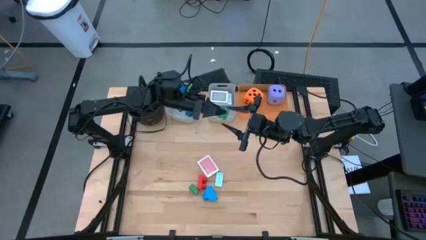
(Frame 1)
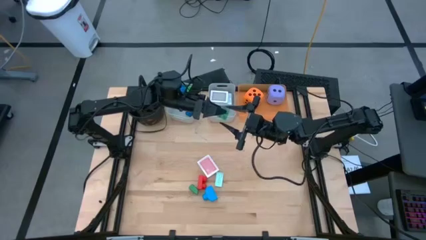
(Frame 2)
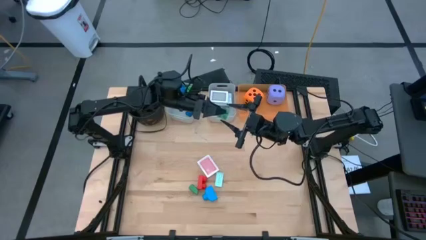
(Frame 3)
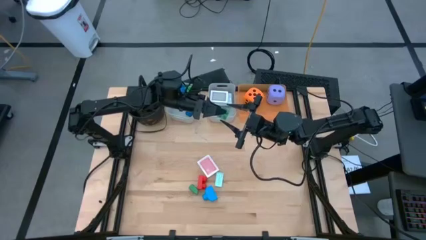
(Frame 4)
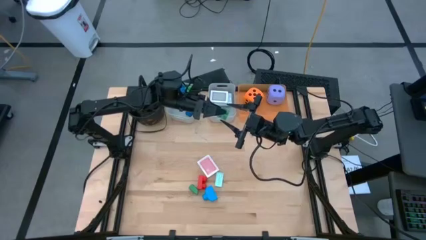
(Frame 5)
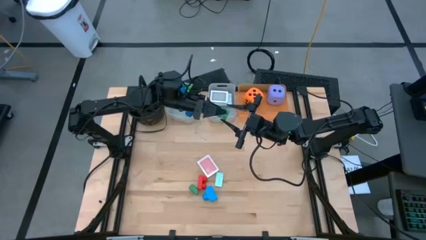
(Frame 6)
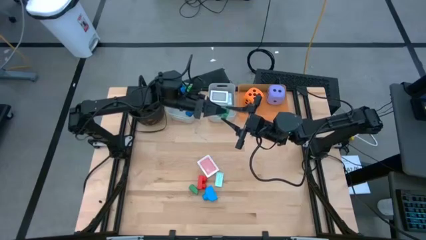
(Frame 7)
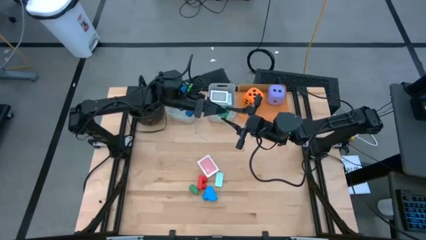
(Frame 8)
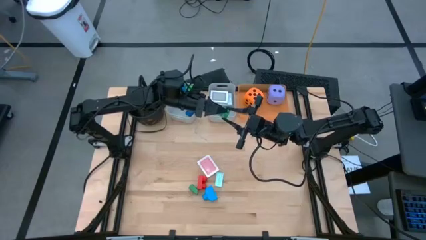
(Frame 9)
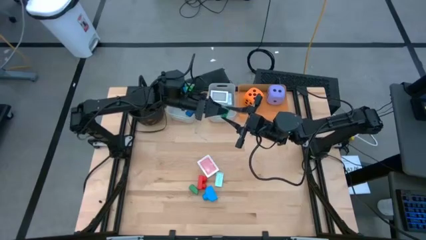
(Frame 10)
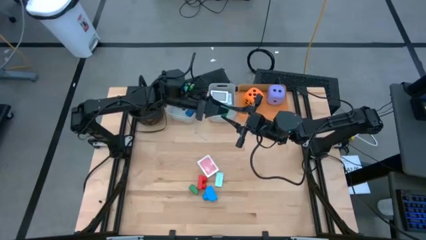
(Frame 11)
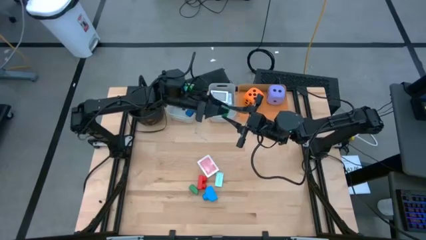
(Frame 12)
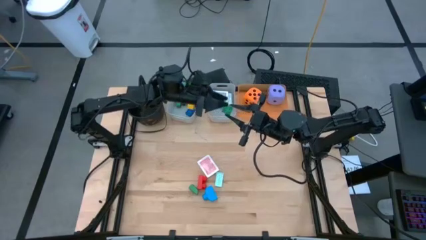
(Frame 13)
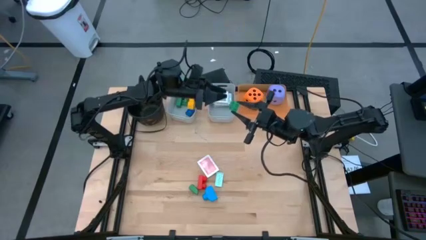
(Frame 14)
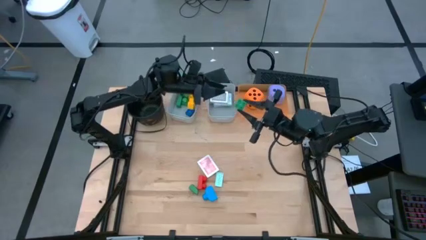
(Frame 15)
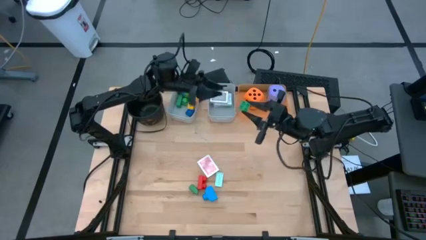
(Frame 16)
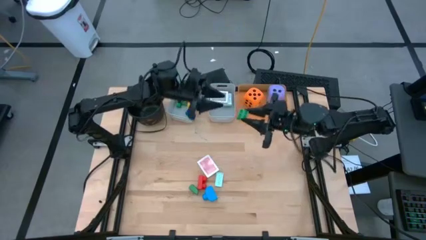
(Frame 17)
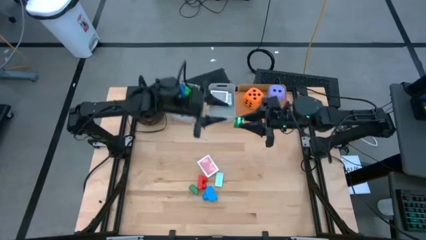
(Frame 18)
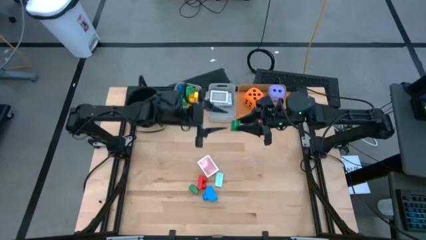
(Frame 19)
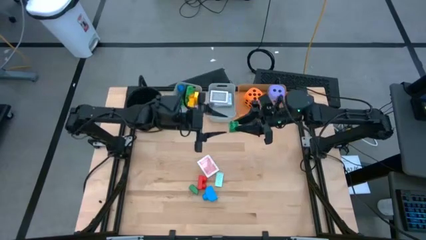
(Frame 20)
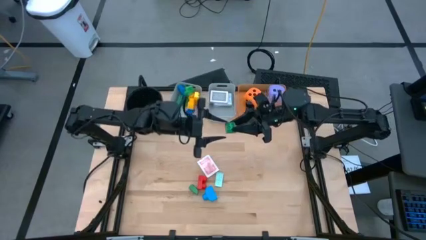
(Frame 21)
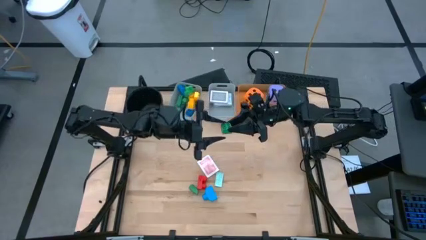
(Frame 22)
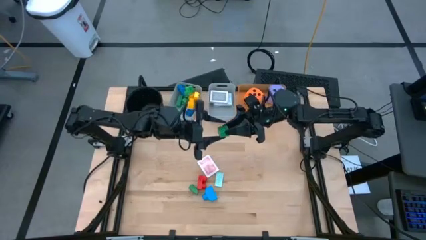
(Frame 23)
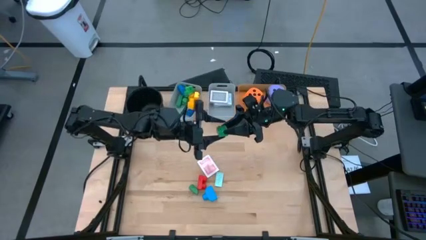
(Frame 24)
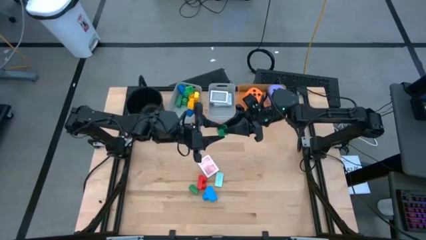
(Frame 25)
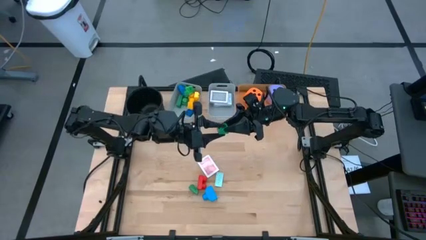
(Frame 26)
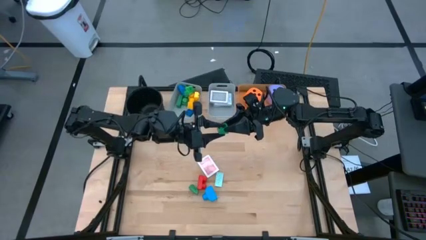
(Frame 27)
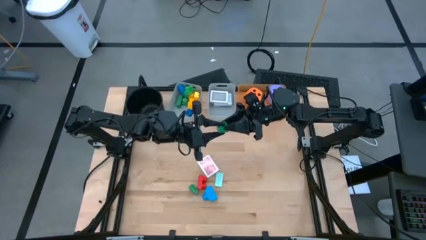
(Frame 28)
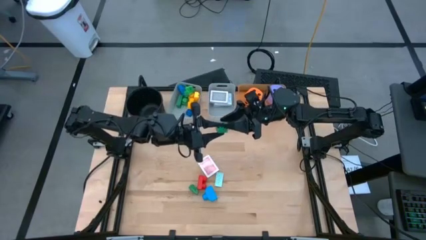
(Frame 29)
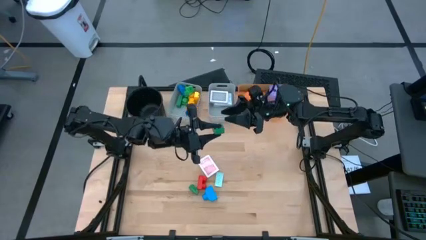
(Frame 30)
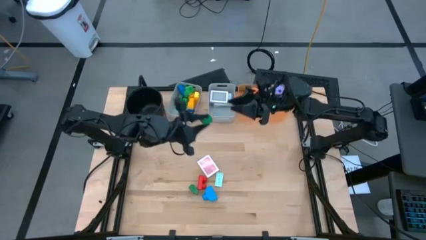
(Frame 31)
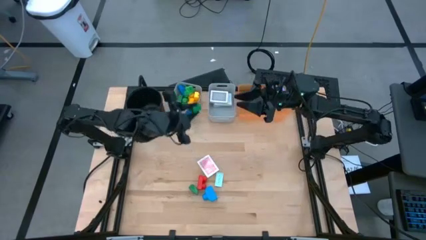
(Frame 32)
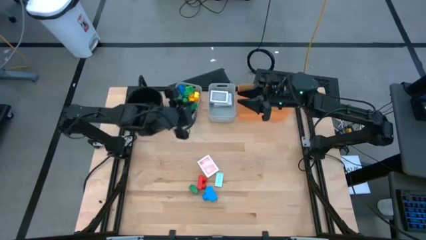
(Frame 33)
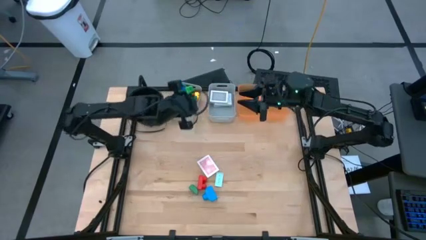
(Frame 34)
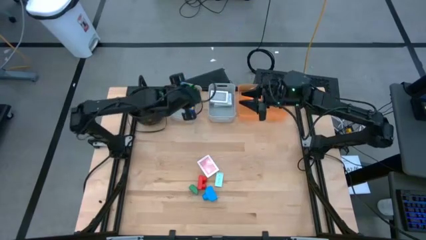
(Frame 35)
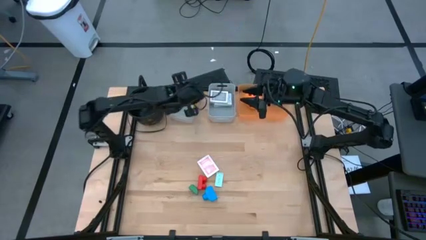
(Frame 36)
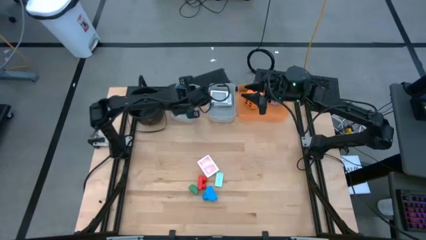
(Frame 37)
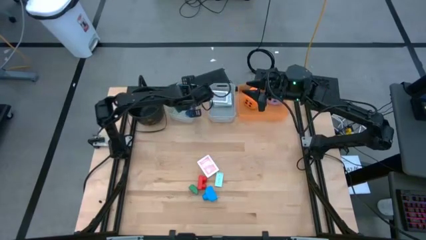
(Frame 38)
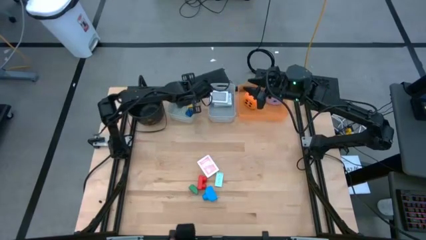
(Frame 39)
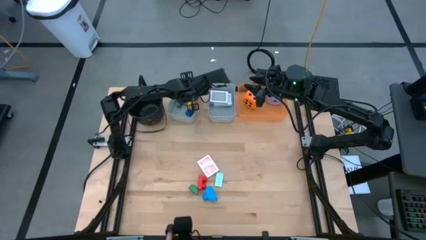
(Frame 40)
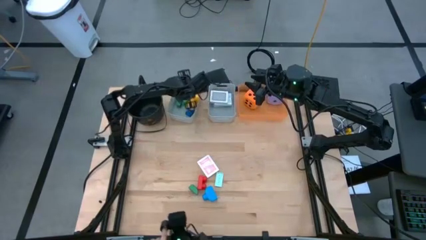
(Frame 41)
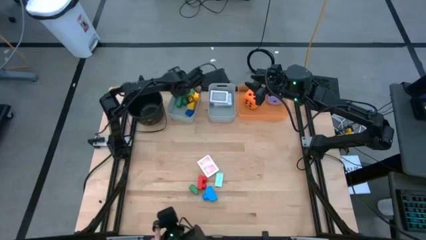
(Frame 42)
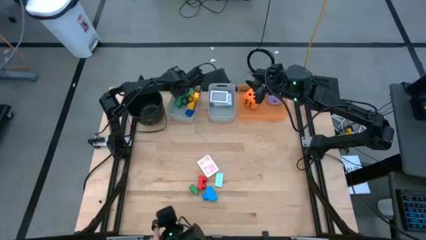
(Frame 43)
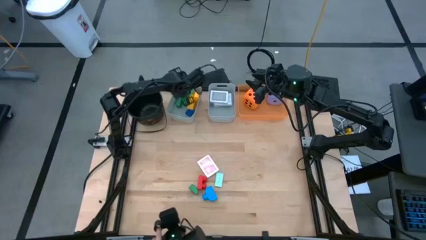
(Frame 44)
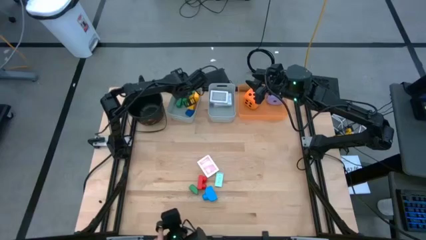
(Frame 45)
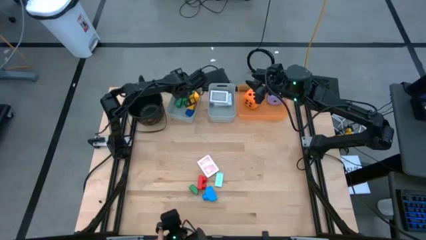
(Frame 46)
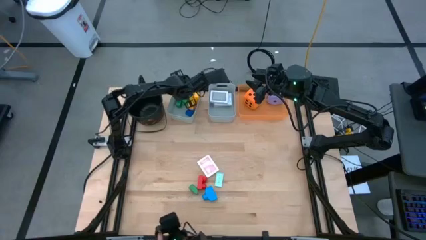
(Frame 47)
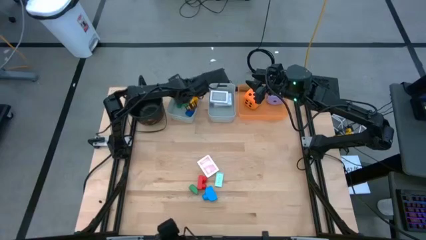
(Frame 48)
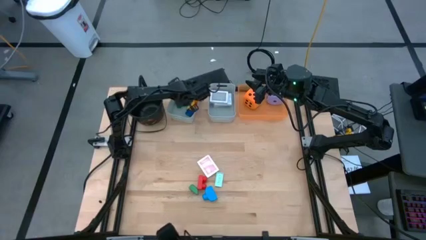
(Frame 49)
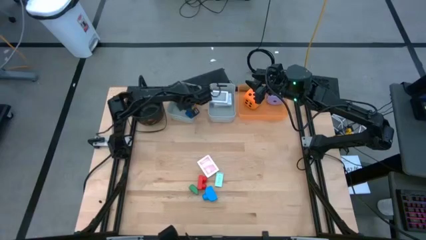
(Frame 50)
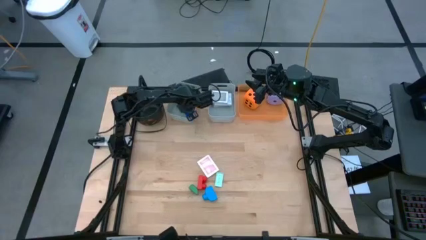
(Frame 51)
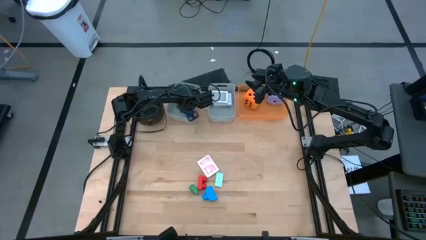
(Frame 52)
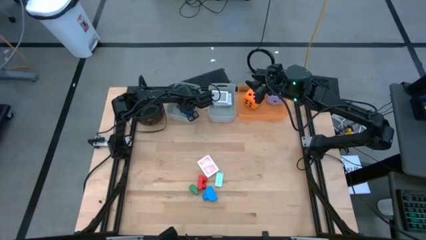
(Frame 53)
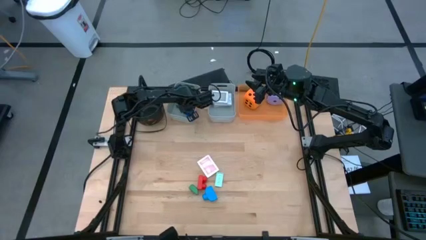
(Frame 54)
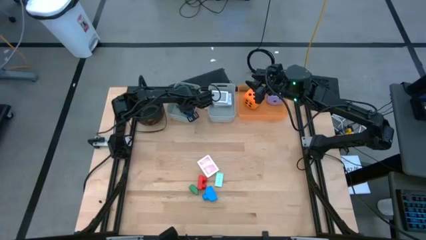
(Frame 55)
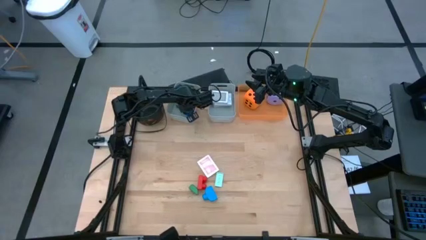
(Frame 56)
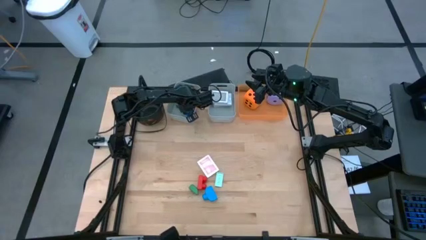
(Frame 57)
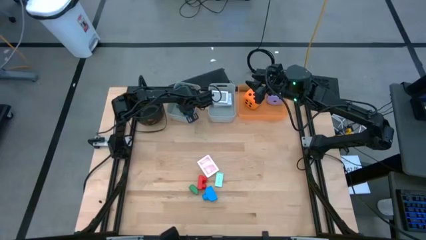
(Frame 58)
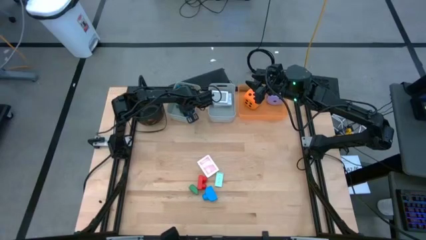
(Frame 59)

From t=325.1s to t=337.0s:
Task: Pick & Place Toys
Put the green game piece into the left gray bin
